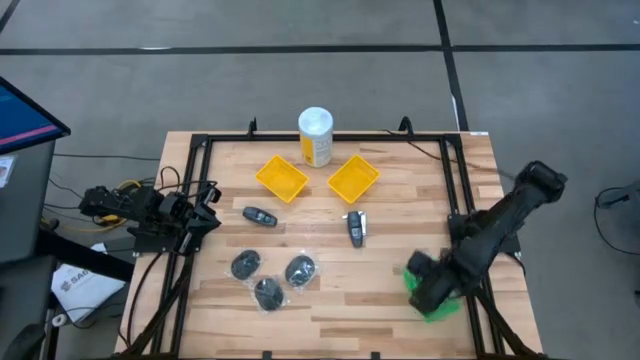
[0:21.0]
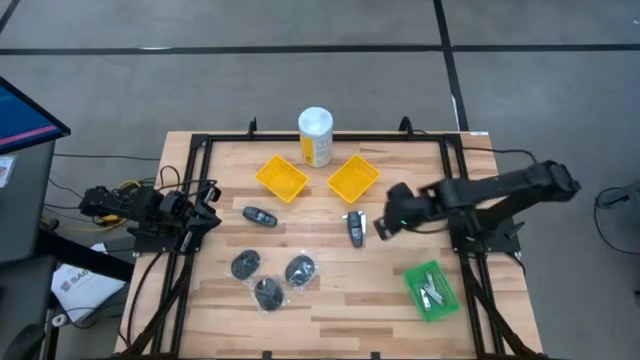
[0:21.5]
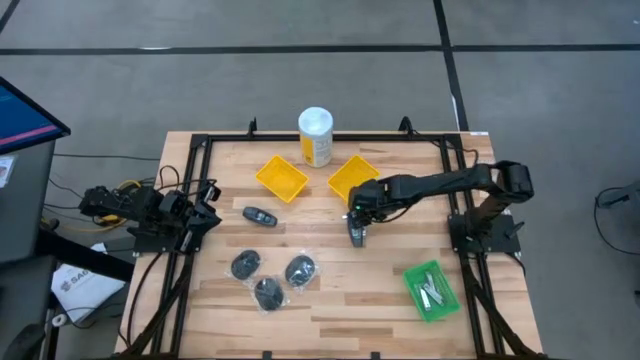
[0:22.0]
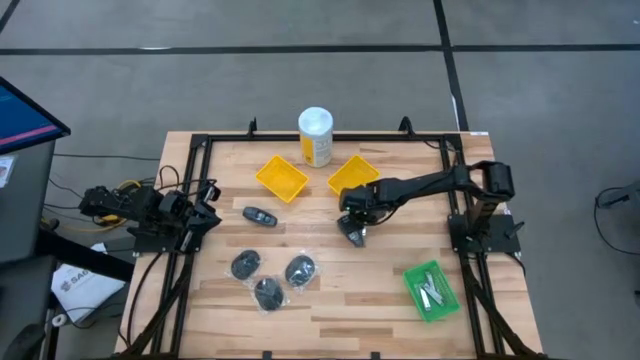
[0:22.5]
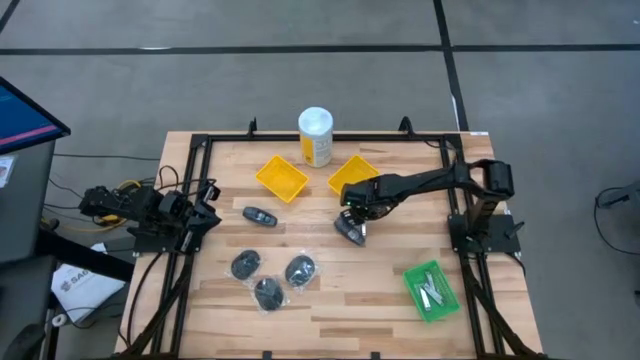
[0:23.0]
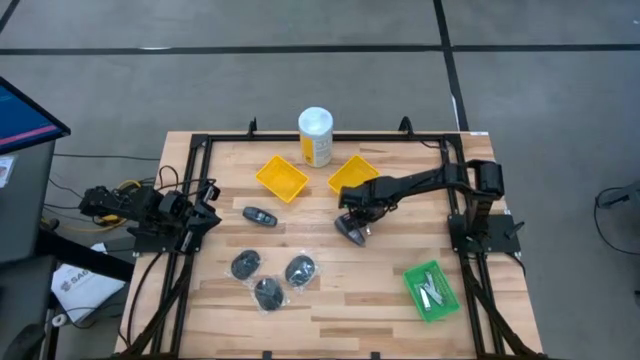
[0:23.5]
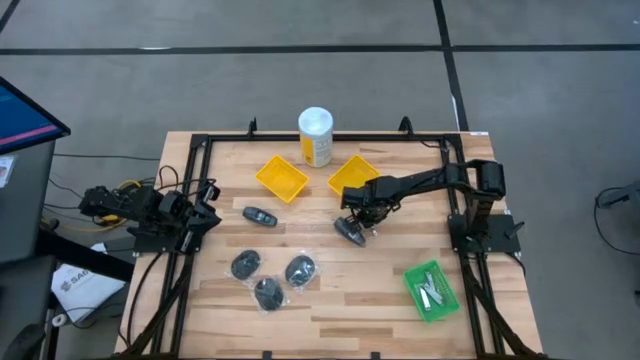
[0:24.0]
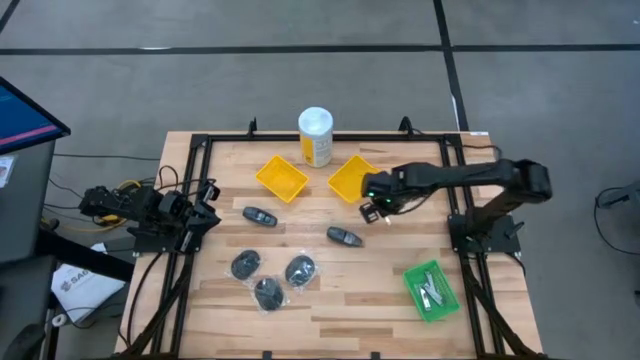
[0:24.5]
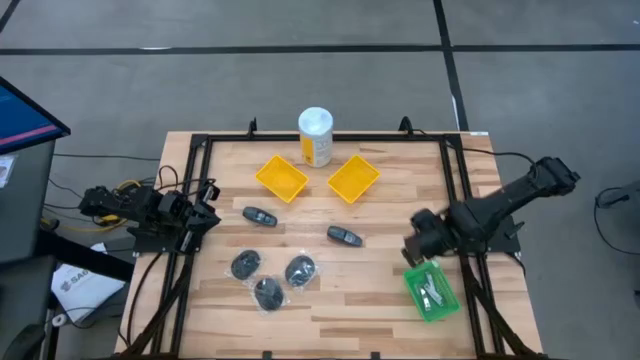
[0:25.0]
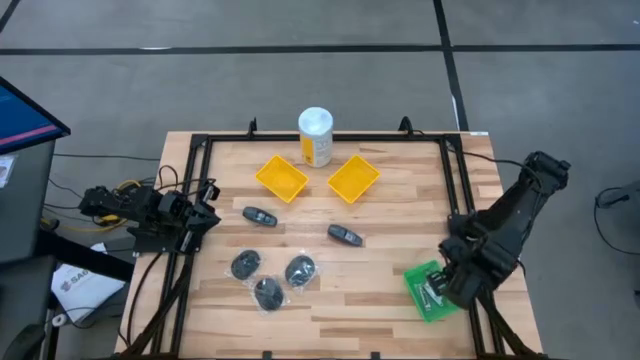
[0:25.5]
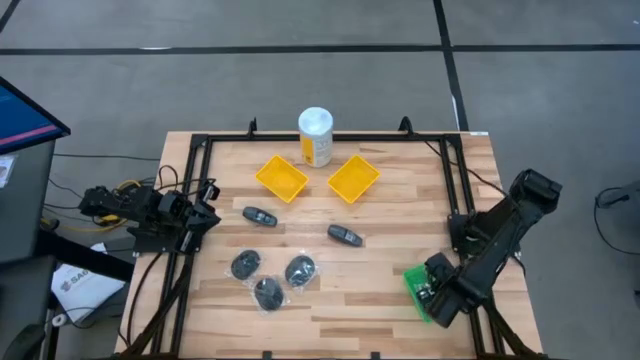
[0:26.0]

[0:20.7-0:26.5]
Task: Pick & Place Travel size toiletries
Put the nail cutter into the green bin

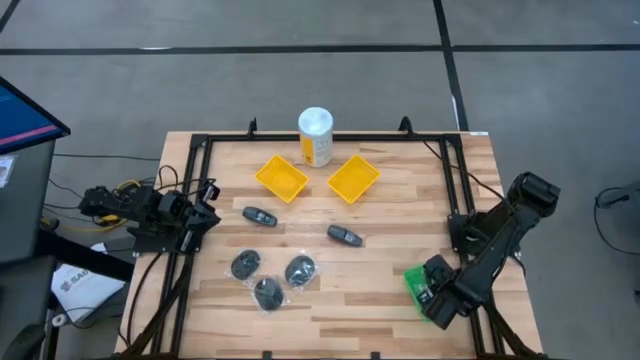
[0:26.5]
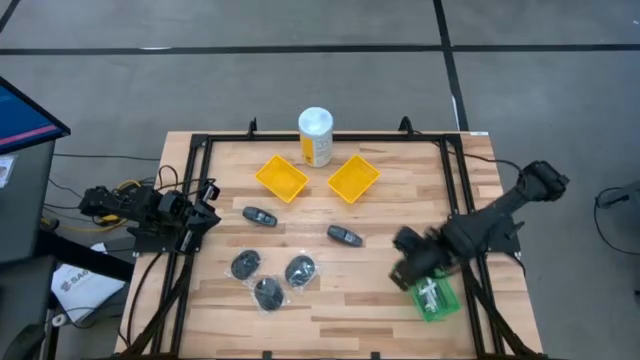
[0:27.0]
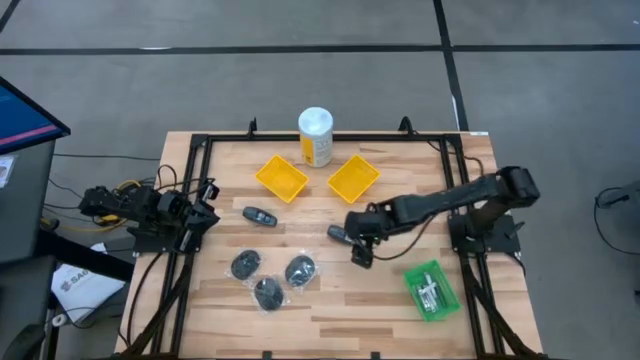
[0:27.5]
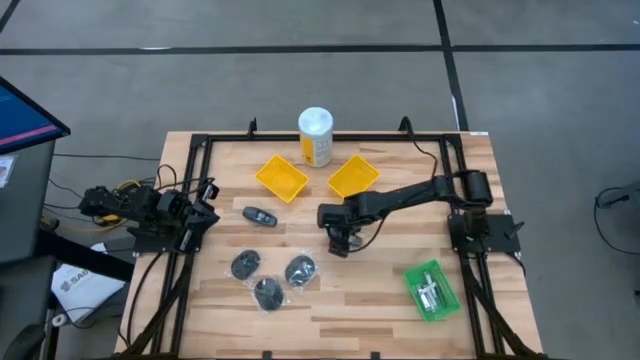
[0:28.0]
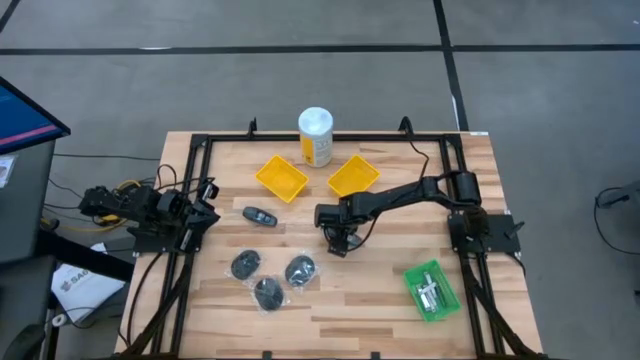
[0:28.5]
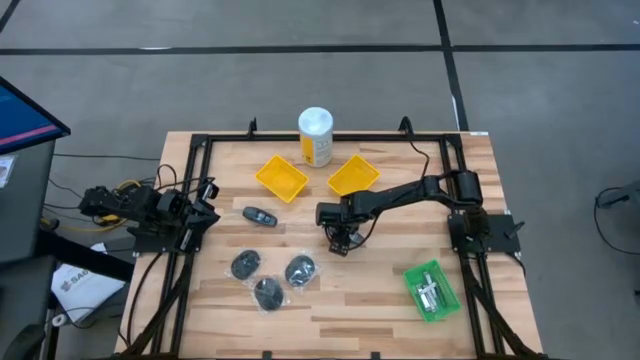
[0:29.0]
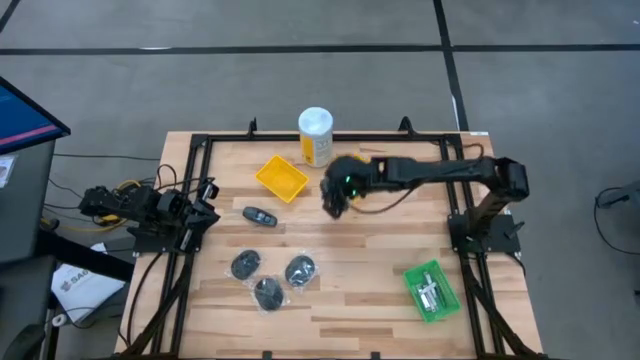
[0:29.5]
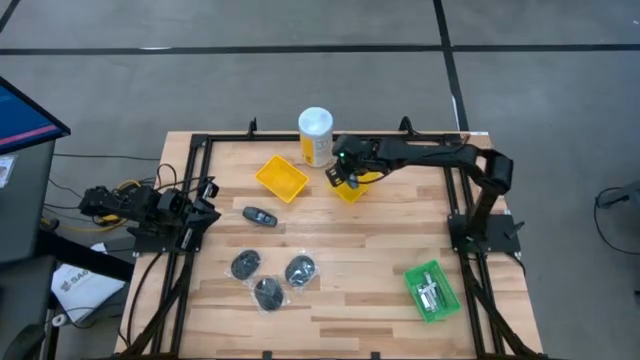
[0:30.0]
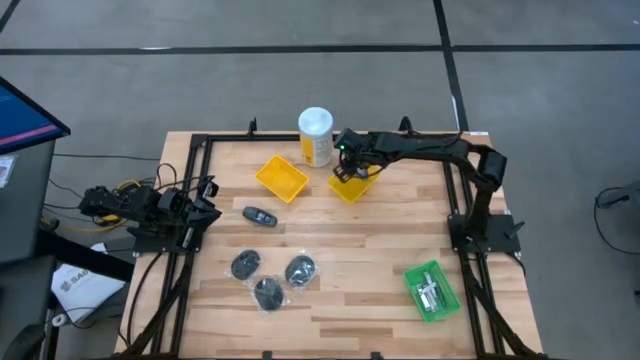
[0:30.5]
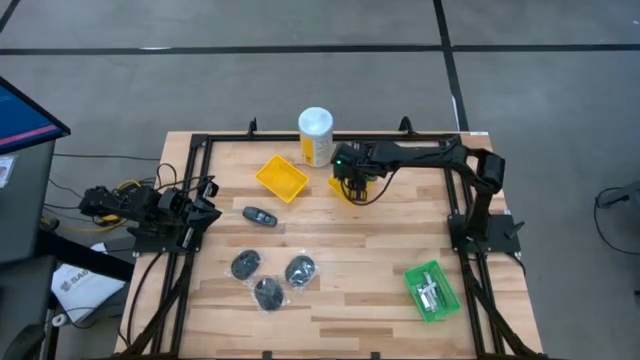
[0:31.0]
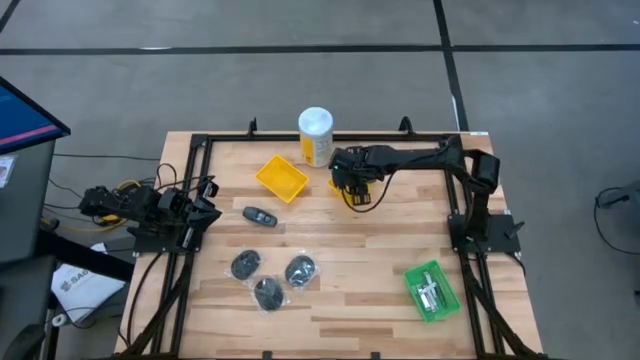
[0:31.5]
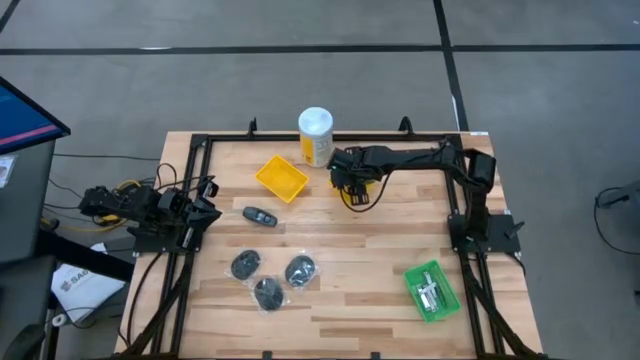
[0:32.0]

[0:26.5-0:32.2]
Put the black deodorant into the right yellow bin

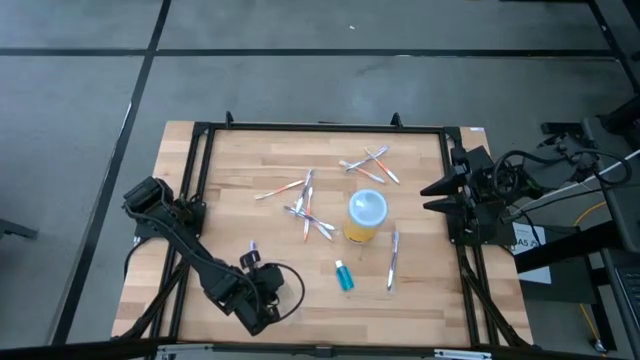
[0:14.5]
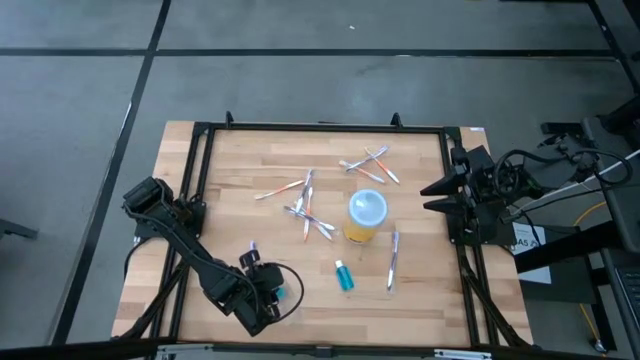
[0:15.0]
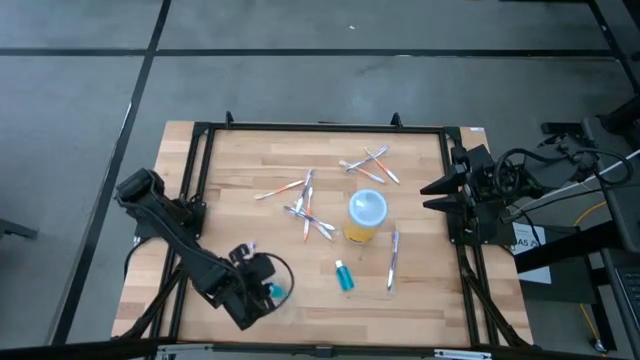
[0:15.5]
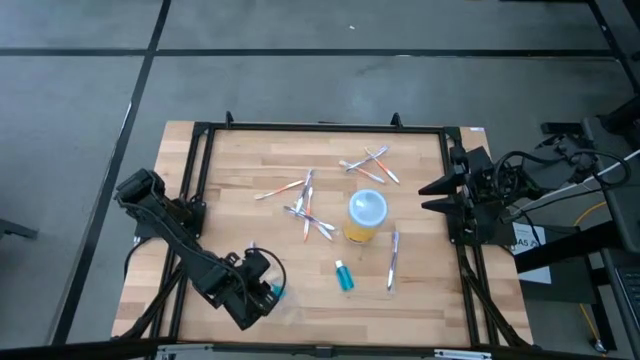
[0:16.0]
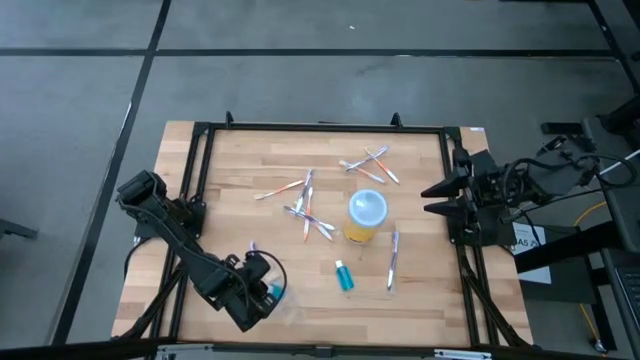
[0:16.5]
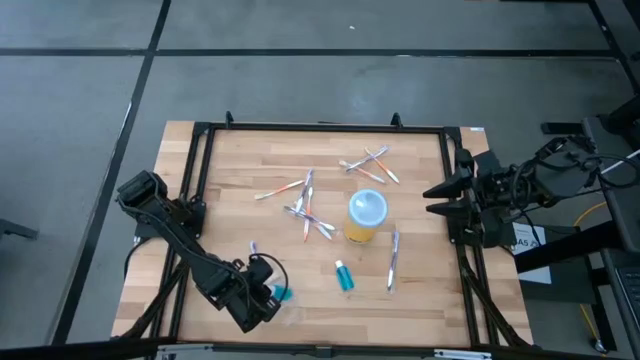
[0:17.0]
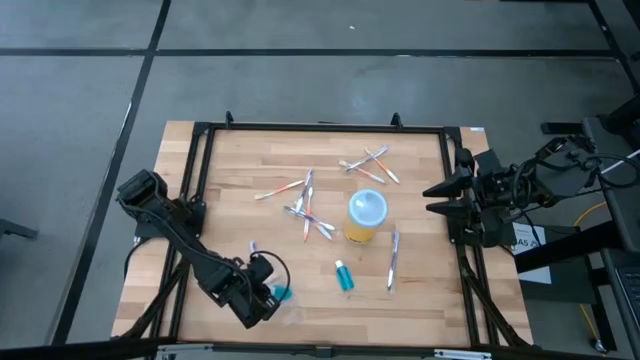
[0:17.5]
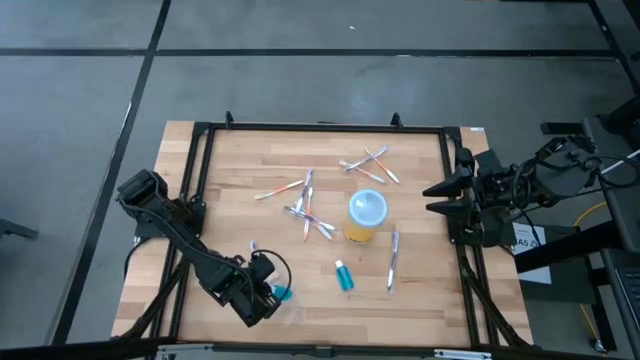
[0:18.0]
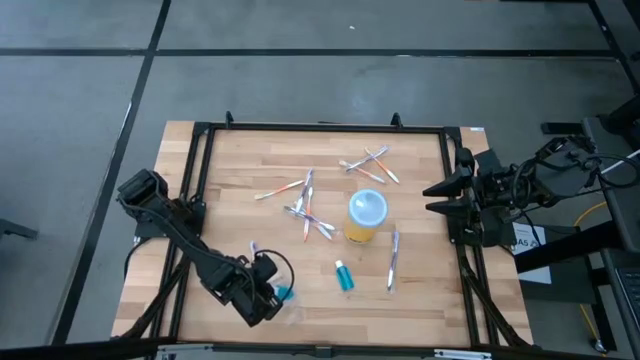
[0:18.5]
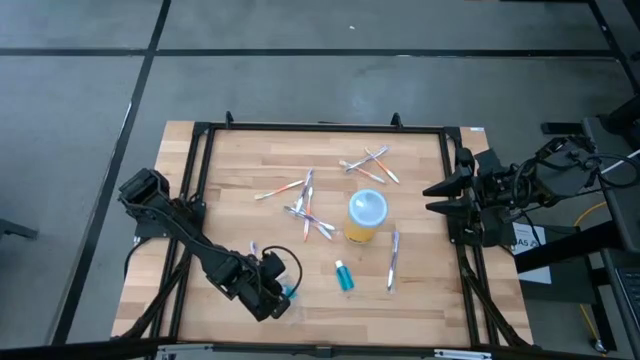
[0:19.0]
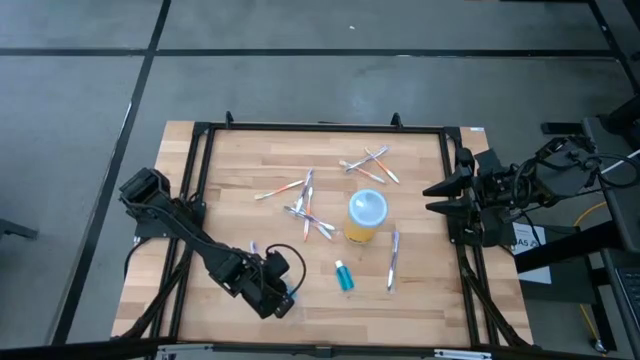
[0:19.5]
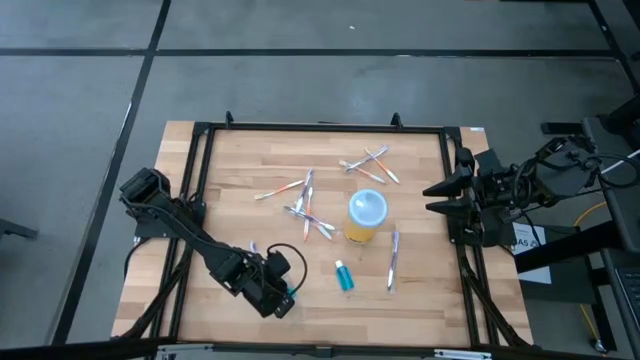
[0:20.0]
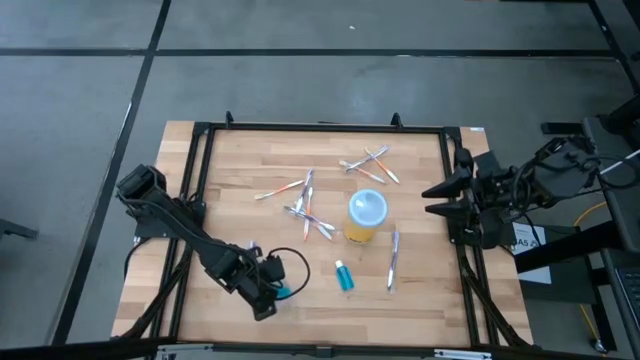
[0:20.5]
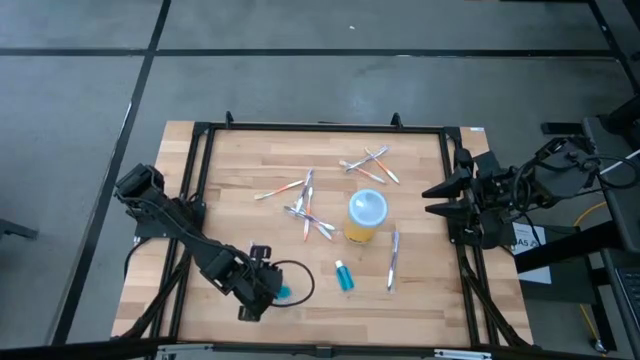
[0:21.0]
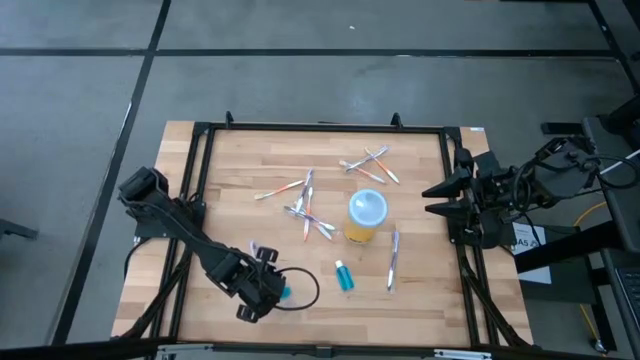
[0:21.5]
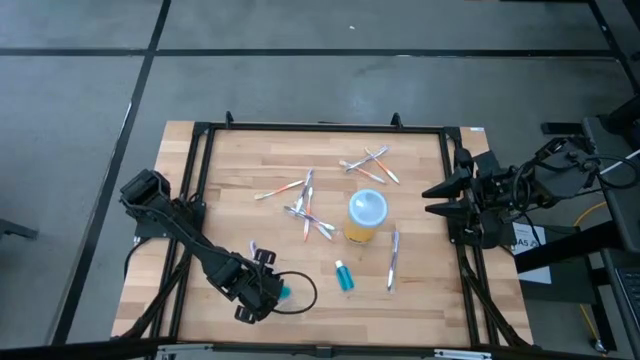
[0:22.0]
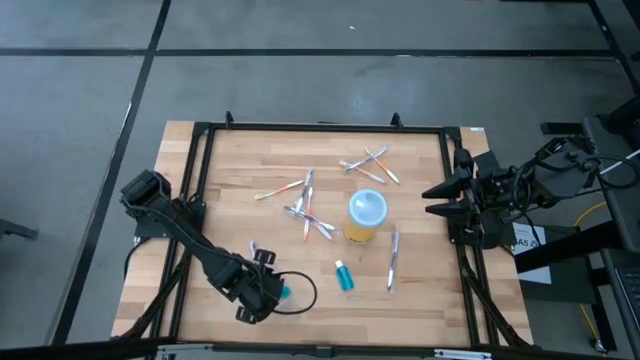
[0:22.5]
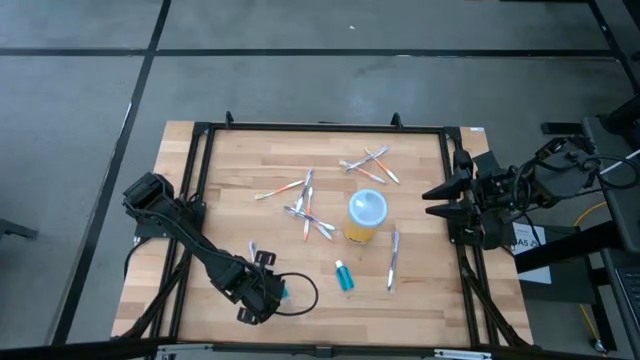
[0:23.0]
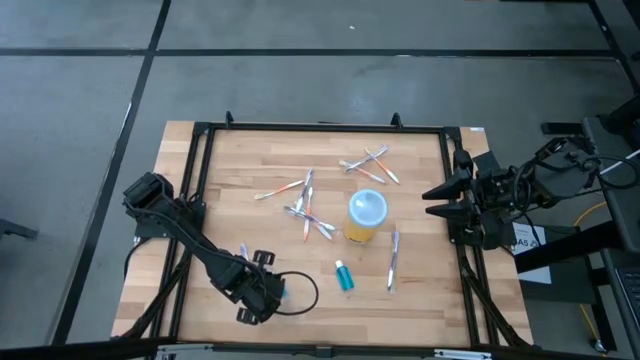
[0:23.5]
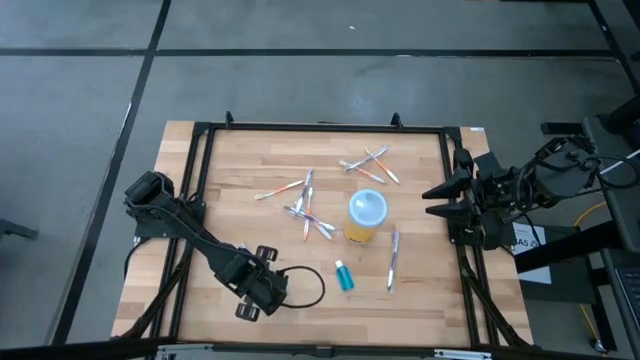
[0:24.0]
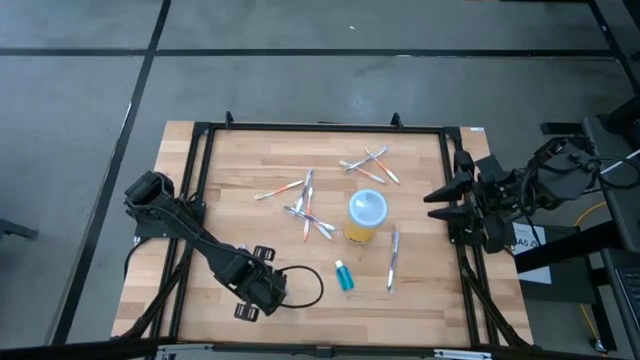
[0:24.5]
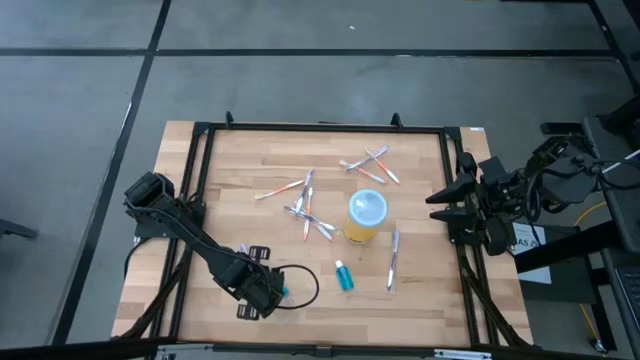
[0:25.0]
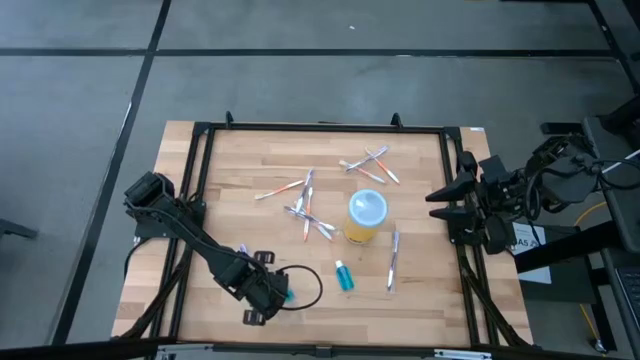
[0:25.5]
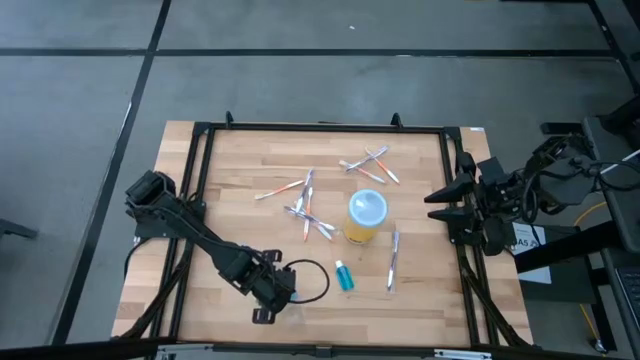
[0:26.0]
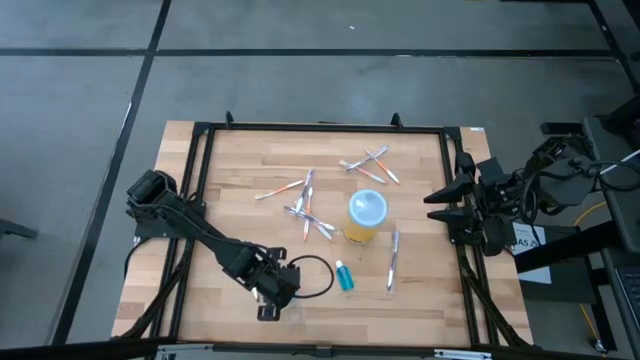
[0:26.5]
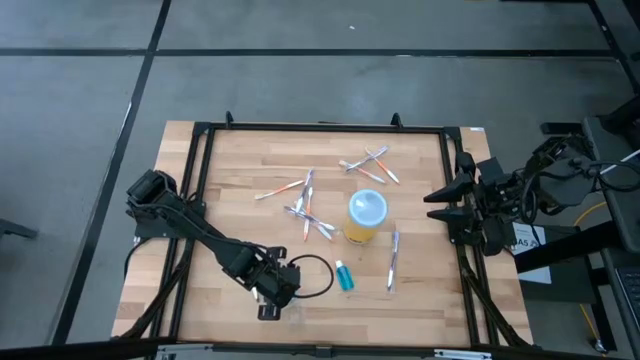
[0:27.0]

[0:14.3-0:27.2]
Task: Pick & Place toothbrushing station
Put the top mouthwash bottle into the middle of the transparent organizer
